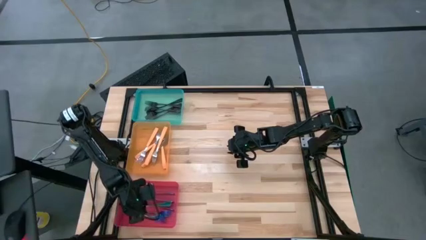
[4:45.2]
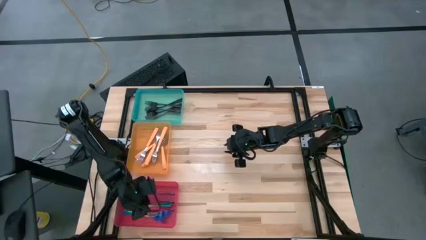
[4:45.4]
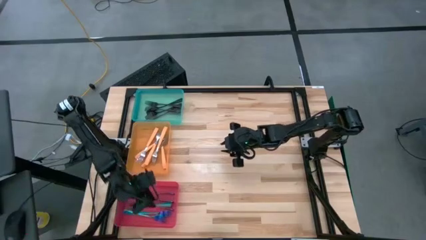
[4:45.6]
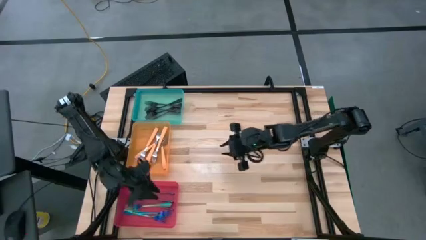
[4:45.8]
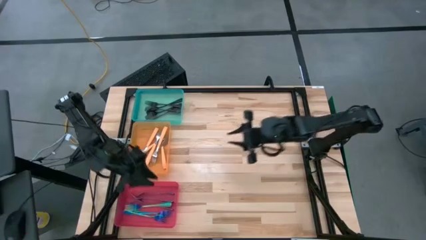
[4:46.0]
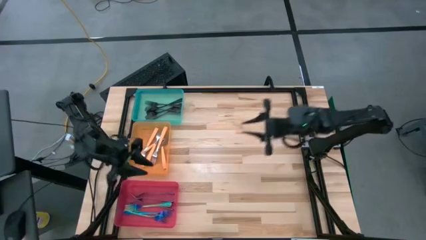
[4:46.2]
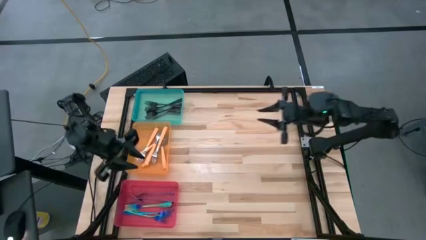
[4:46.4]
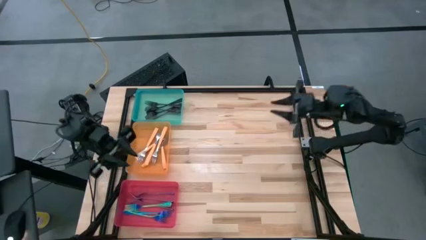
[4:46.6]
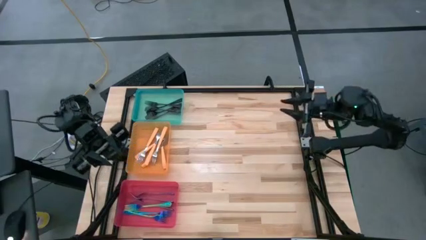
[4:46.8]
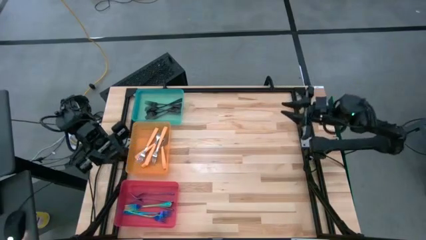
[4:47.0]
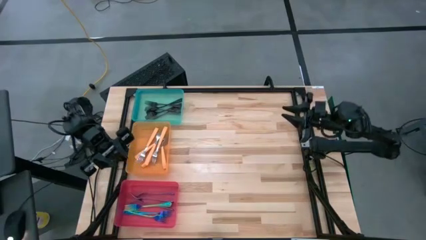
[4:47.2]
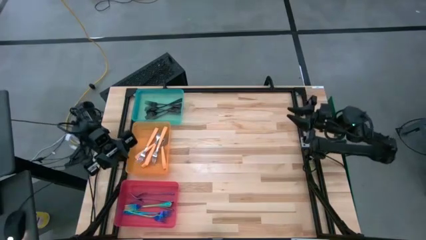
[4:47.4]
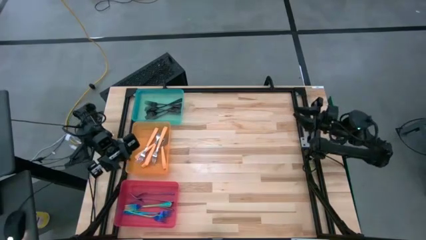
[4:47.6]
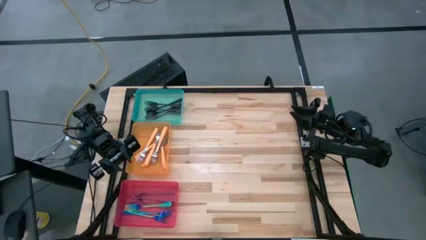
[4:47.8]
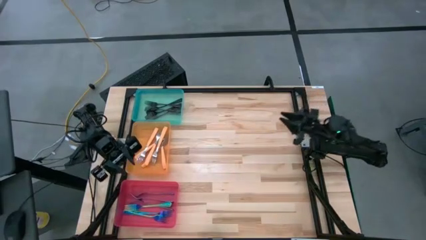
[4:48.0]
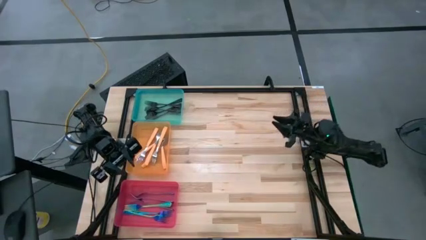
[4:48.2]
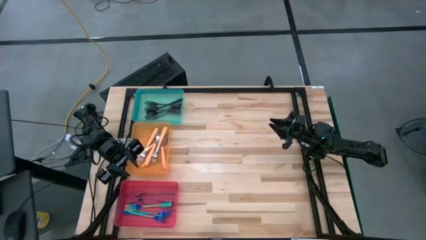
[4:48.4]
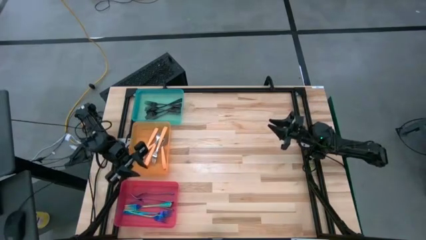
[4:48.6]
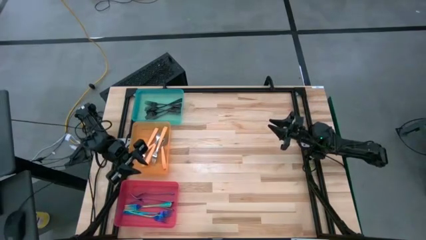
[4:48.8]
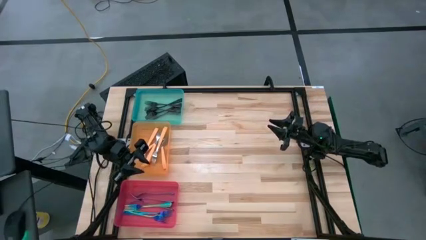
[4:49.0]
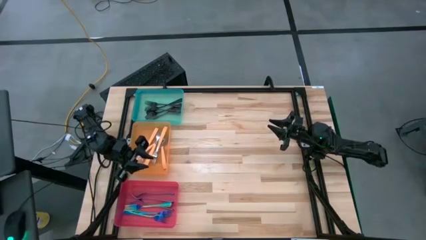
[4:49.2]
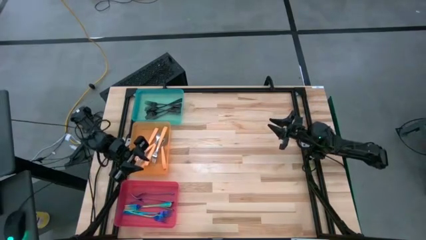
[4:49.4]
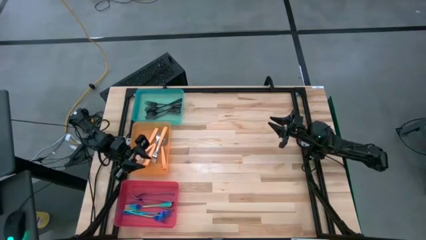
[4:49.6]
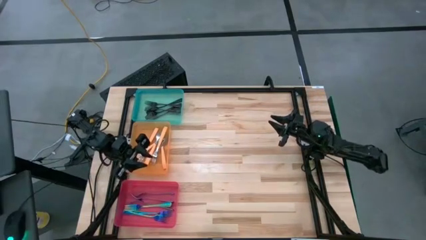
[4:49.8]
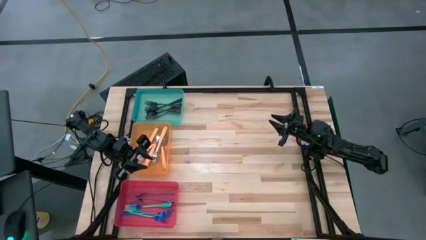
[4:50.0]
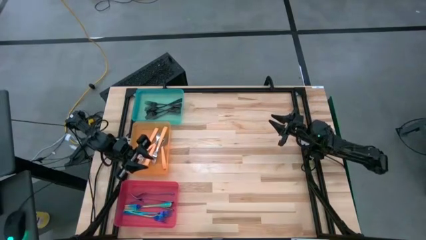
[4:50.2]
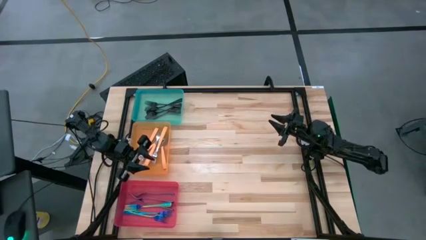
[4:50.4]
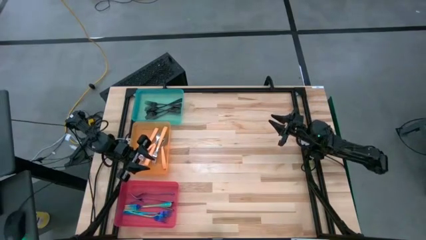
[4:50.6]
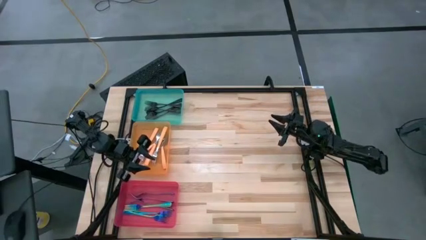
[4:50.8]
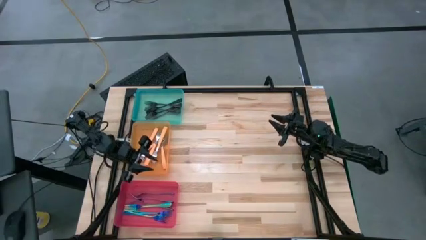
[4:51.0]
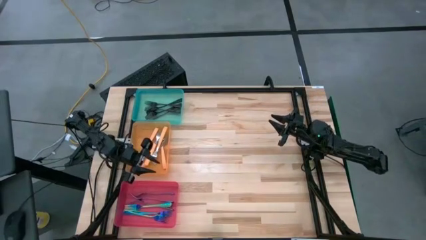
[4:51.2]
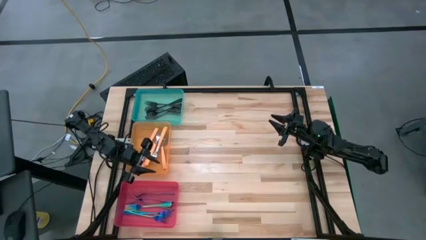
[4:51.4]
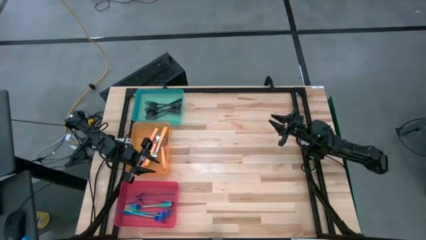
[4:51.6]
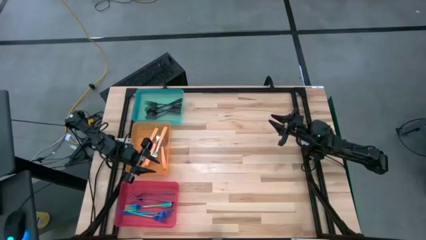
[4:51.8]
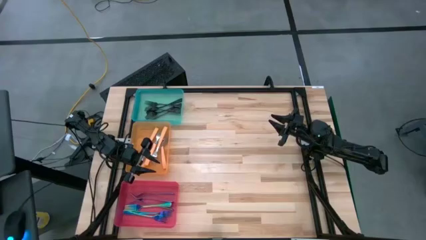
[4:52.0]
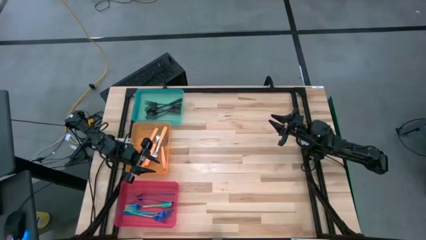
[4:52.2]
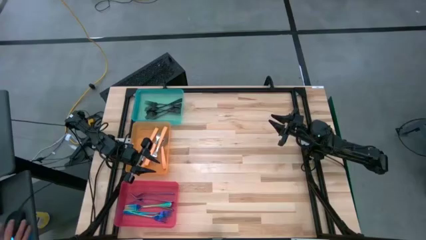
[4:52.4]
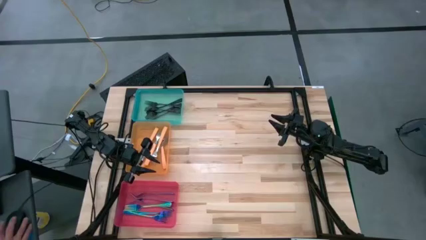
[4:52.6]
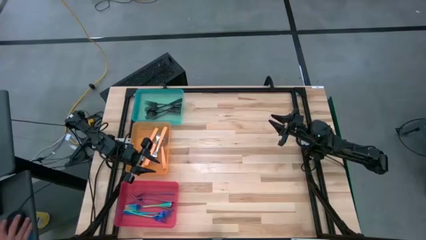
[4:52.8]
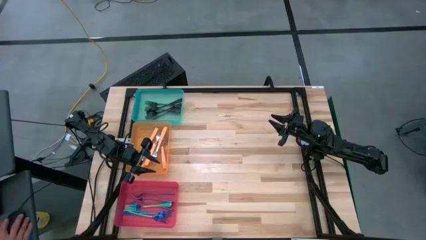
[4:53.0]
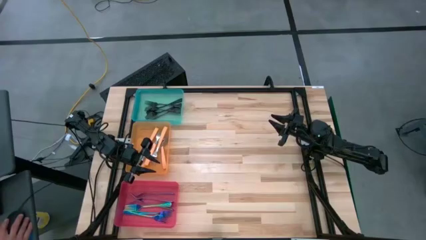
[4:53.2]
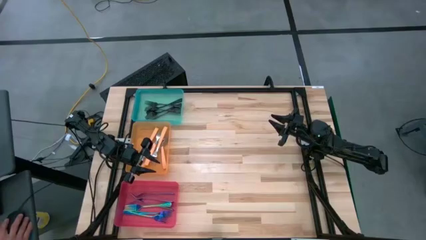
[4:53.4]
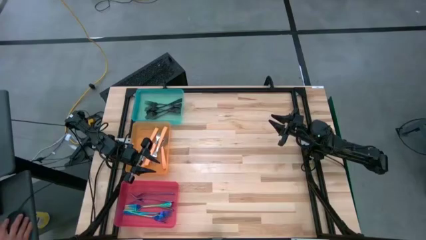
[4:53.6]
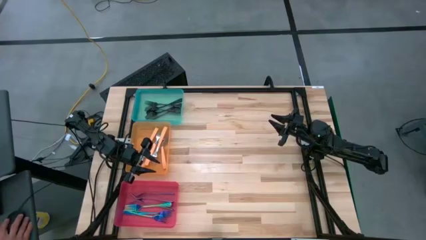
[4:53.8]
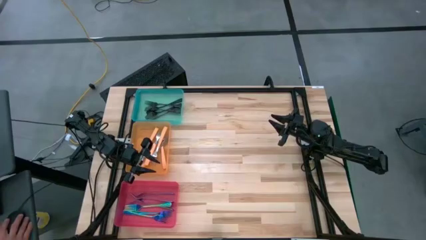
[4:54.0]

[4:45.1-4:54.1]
Task: Sort silverware by color (type)
Return to Home Position

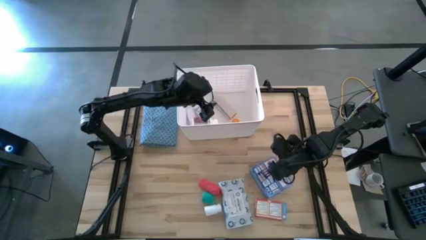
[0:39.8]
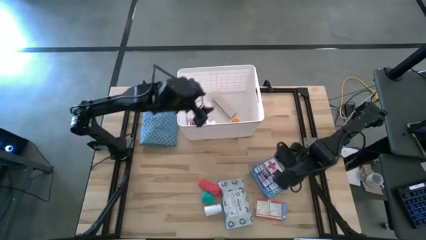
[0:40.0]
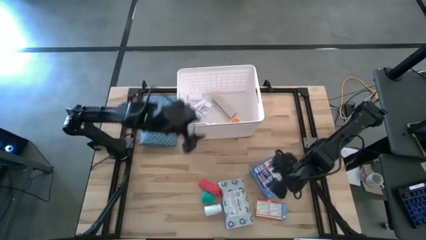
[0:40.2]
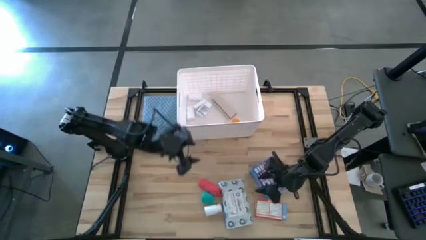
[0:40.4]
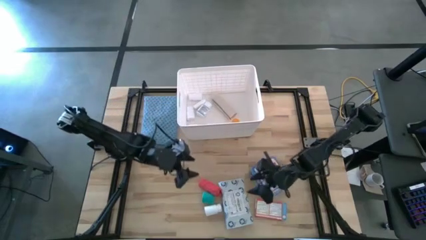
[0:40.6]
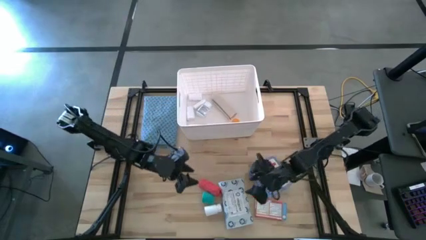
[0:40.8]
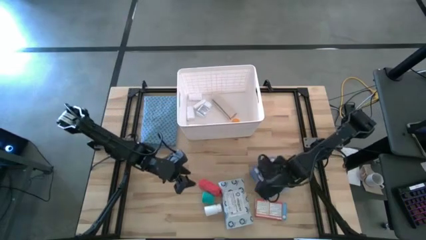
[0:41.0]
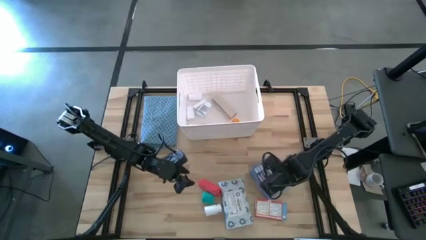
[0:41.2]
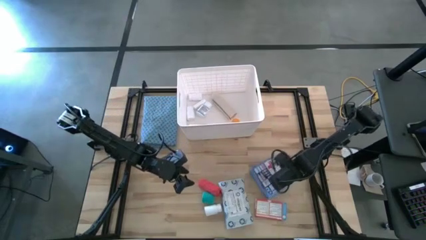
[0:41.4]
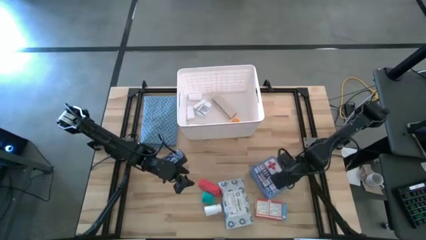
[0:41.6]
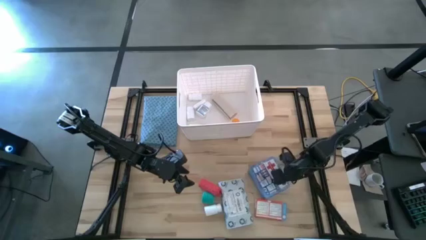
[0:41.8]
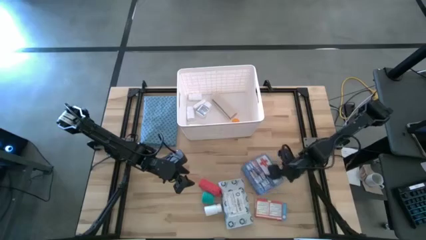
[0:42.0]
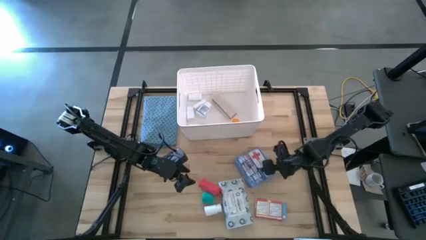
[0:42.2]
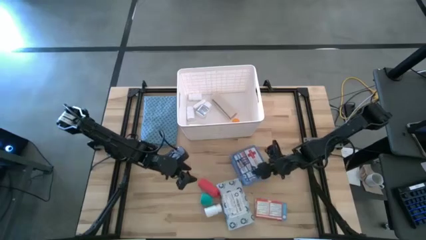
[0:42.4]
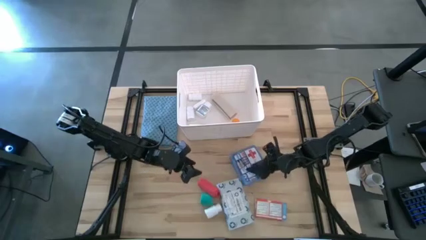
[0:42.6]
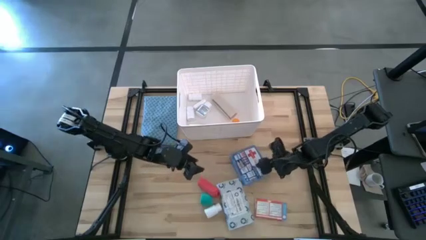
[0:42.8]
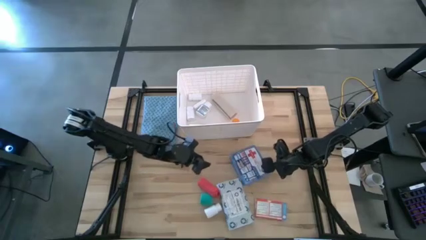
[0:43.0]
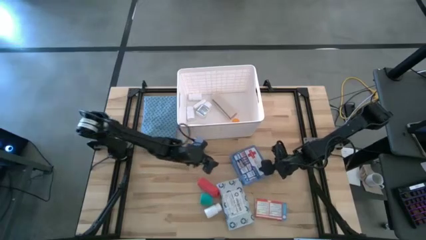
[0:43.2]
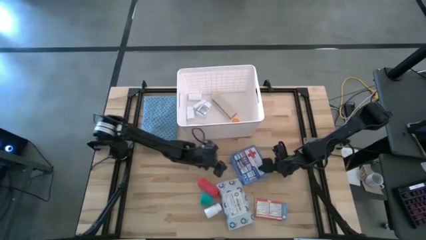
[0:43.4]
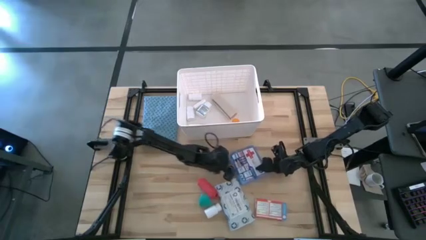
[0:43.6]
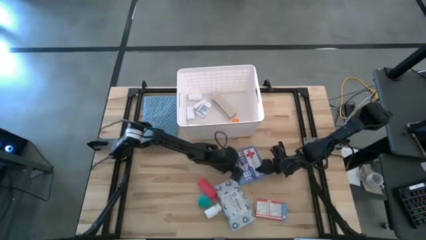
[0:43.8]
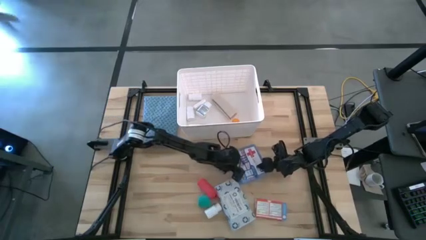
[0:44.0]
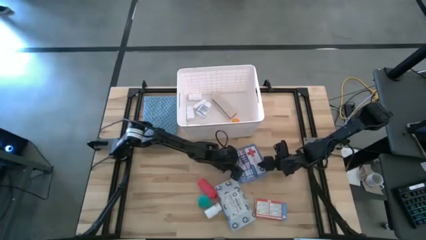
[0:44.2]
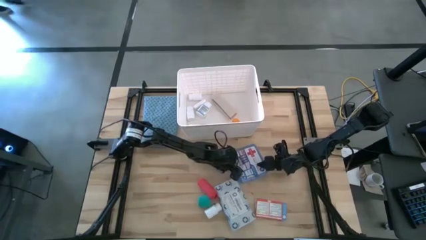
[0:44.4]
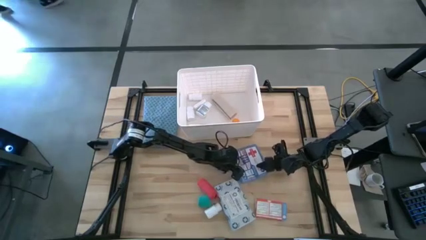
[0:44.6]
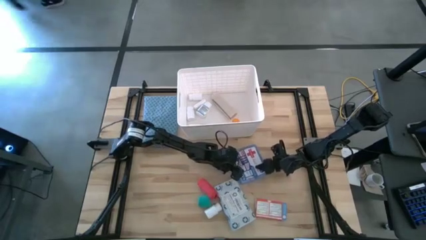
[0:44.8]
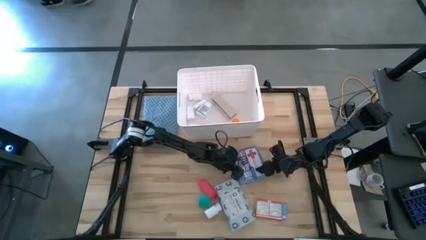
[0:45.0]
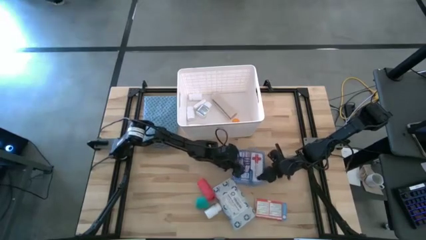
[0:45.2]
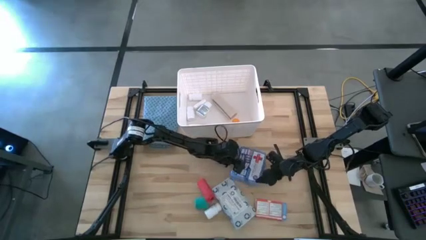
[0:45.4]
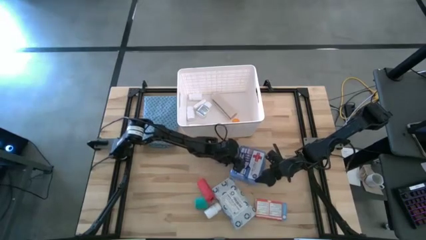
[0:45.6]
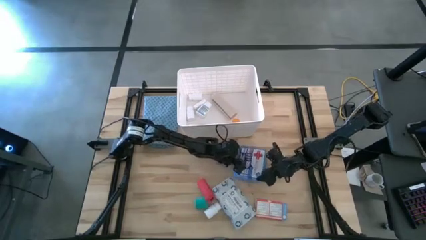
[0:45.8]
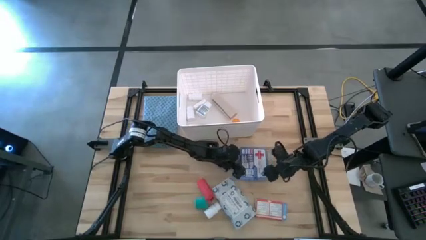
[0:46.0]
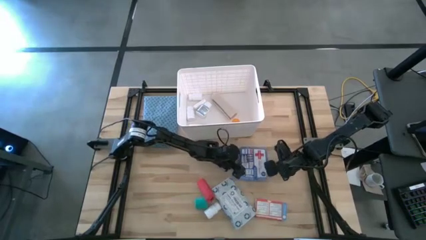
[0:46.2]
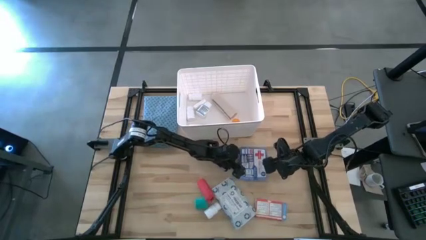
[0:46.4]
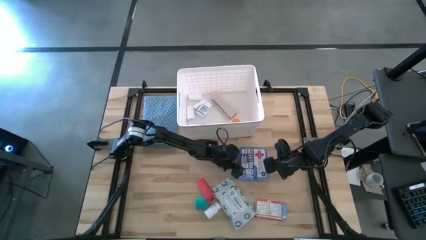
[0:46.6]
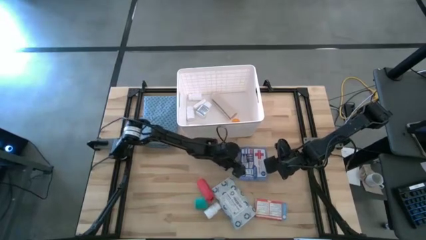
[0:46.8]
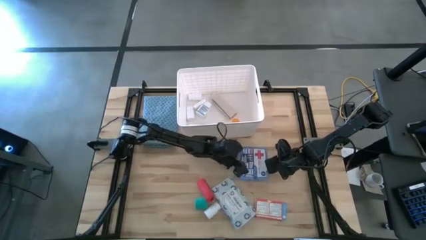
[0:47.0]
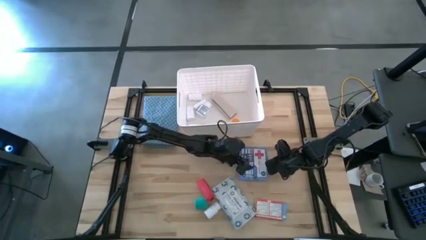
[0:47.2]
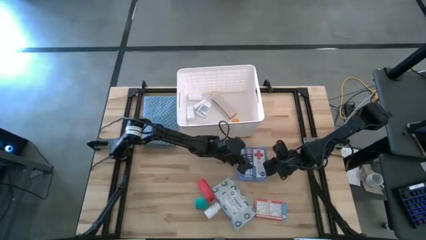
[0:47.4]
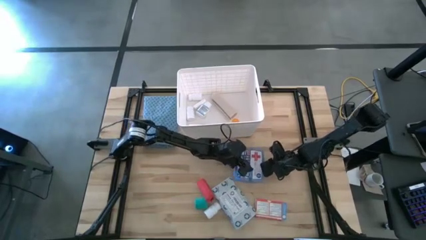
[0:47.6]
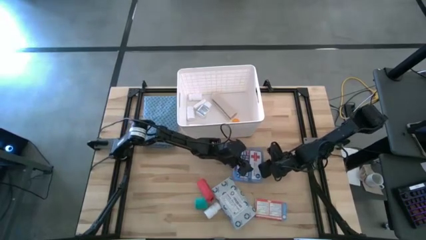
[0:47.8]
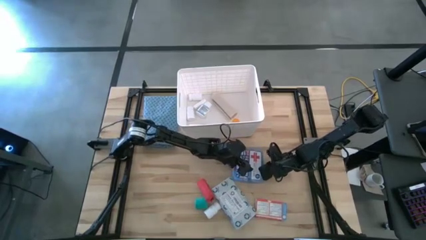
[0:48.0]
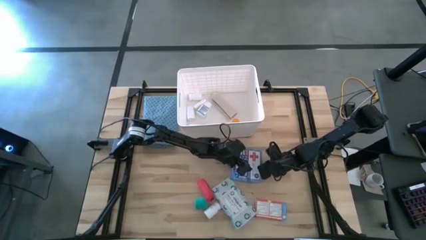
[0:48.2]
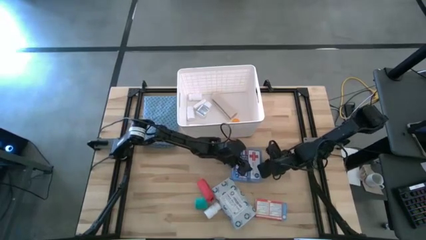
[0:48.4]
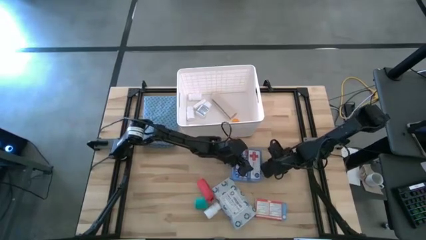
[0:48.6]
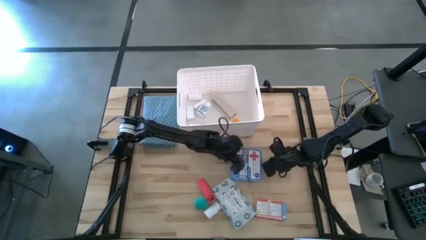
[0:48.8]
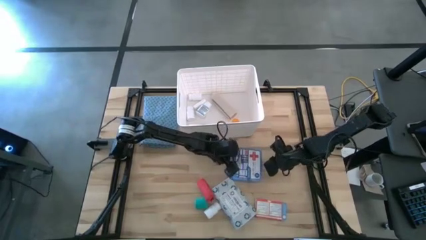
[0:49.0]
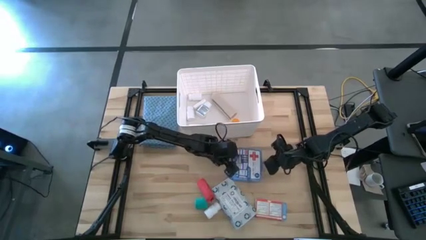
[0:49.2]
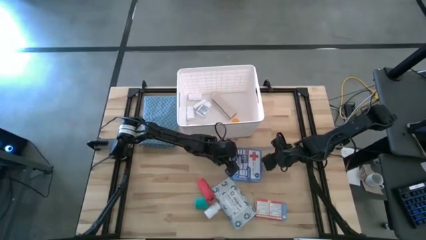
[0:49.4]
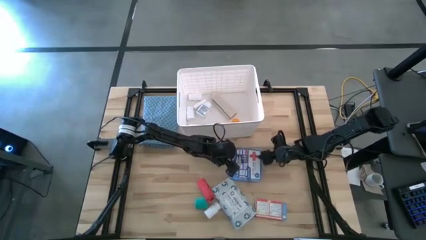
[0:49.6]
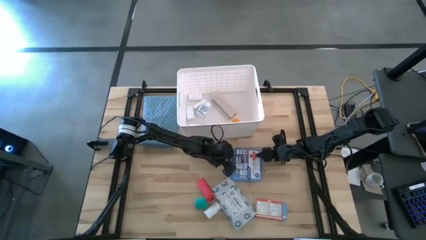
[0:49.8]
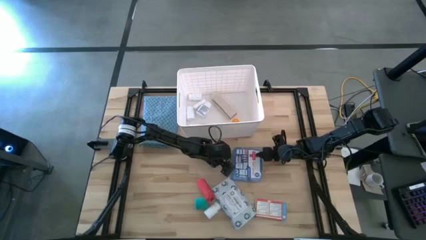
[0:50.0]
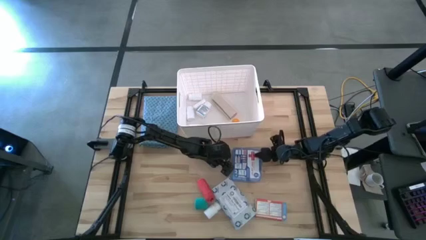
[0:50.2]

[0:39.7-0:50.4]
Task: Pick & place medical supplies in basket/bin
Put the blue first aid kit into the white container
